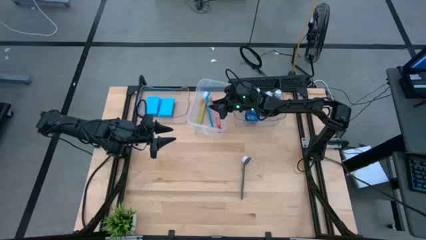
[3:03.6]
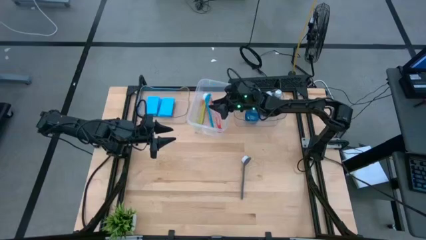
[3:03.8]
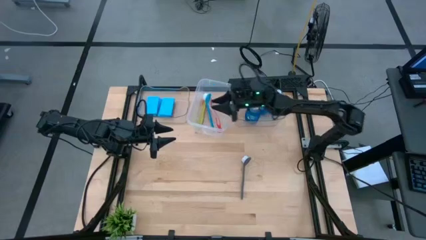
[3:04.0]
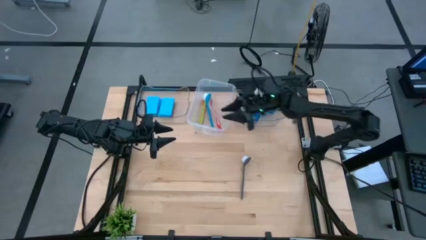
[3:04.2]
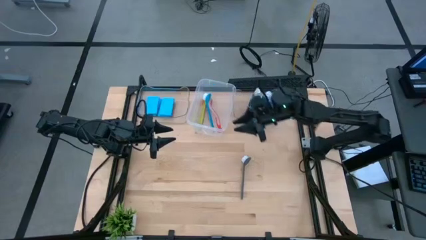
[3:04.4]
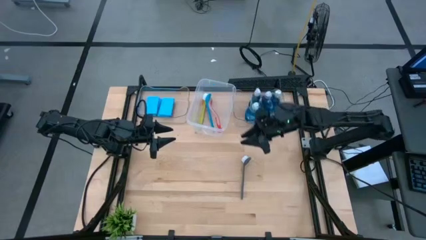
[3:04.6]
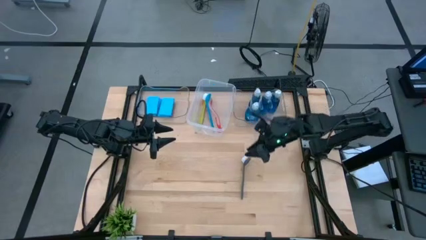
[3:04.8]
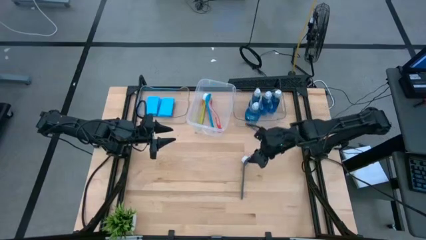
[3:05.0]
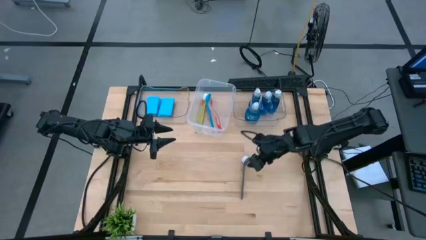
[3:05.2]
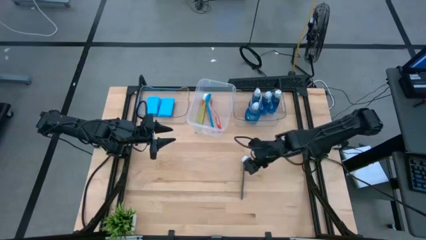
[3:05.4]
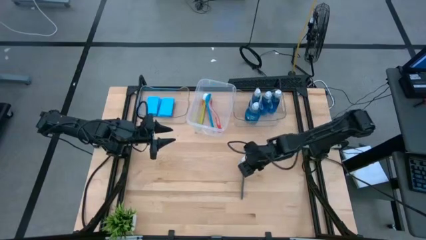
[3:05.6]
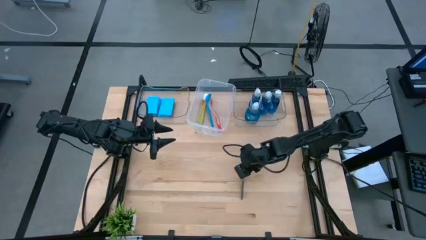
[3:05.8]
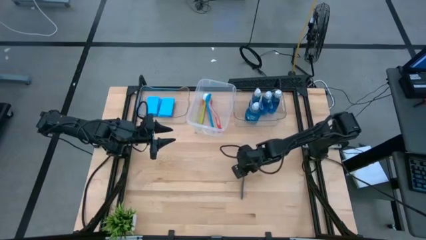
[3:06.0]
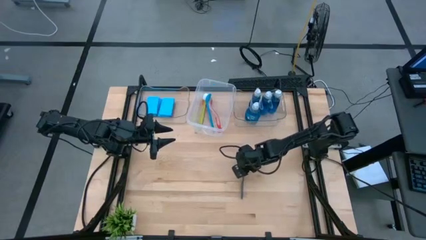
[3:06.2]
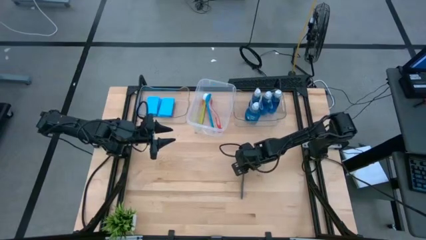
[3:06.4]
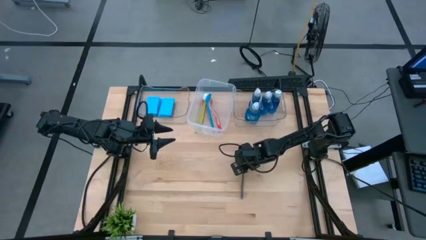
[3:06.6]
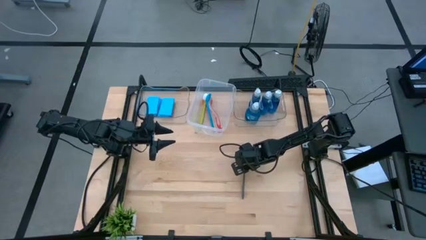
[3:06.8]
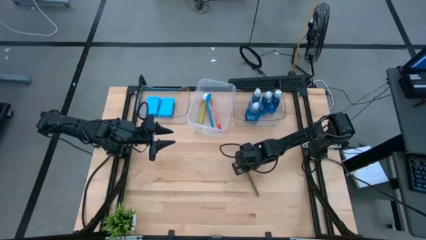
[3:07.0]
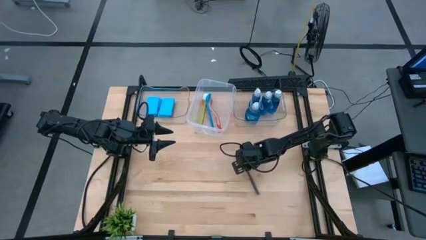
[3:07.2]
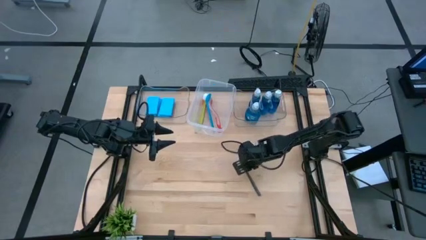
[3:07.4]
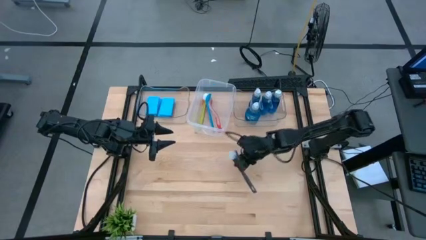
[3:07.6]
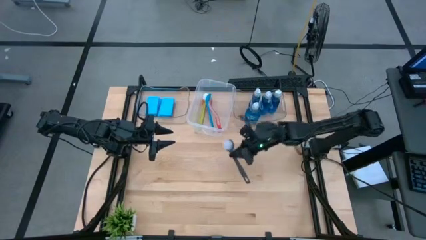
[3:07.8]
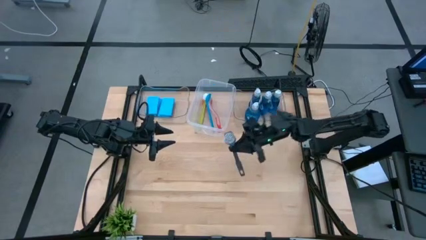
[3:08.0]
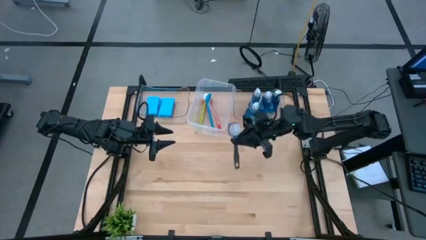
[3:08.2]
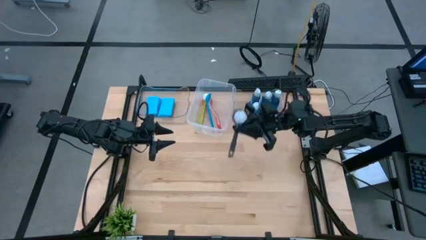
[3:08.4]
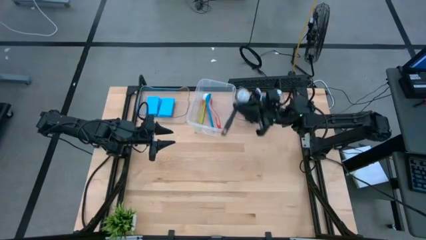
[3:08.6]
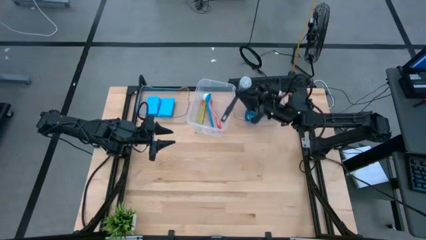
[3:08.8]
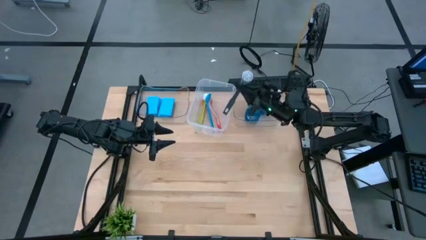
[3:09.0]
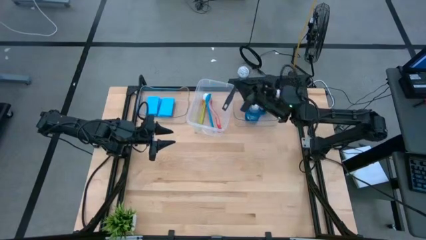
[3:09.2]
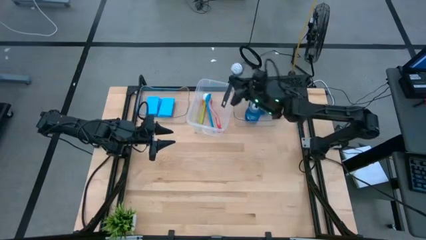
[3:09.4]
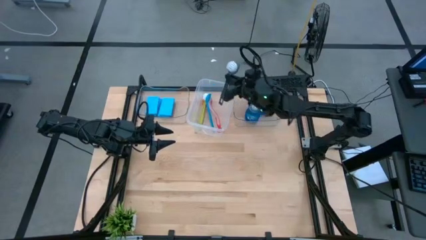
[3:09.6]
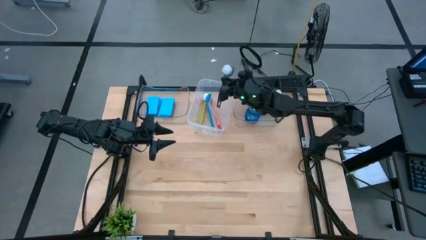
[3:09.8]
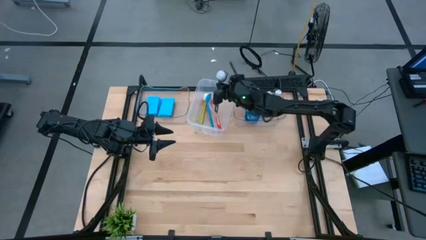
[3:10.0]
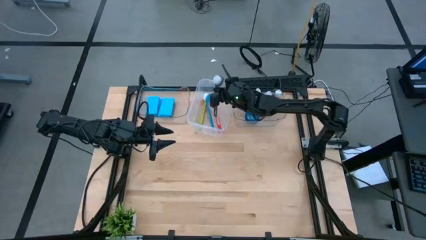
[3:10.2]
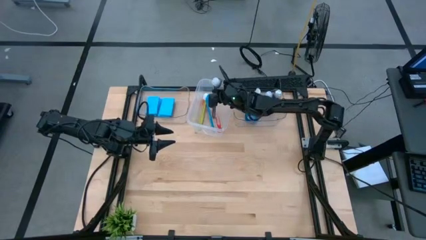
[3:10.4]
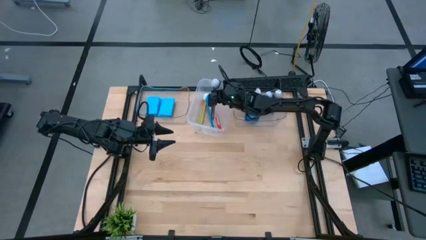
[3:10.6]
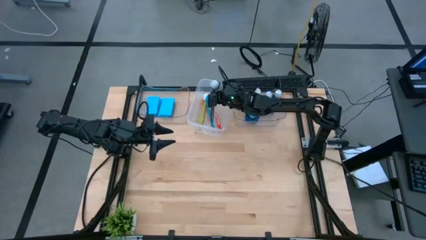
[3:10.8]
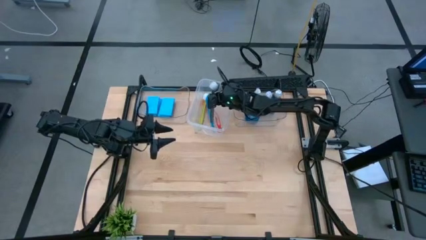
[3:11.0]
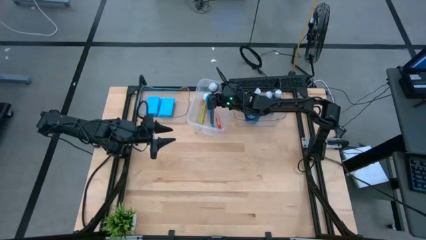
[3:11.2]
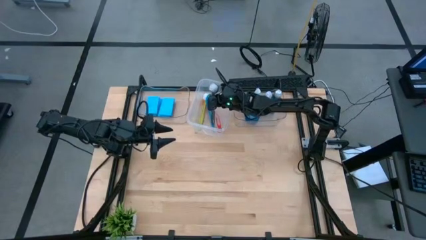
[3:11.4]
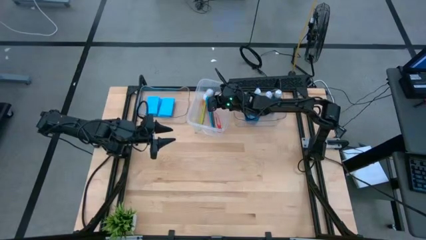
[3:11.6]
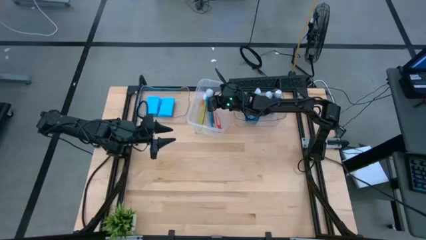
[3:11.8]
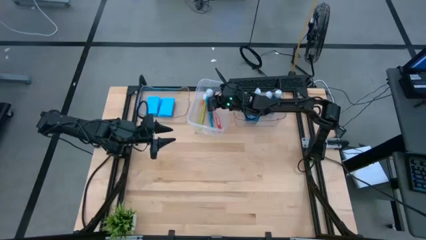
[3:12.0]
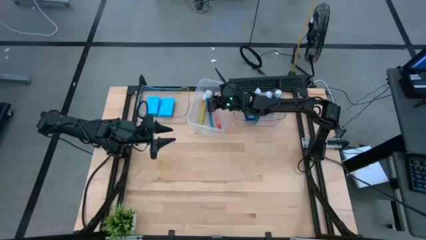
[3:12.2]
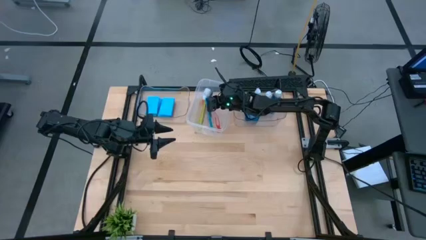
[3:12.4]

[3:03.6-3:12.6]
Task: Pick & Place Kitchen Sink Supplies
Put the black dish brush into the middle transparent bin

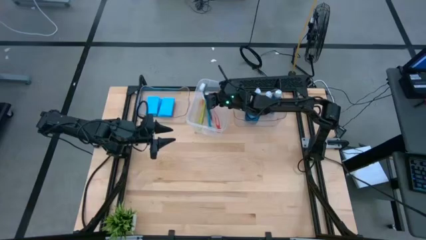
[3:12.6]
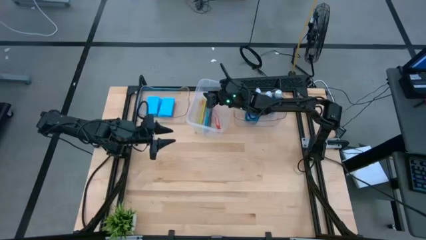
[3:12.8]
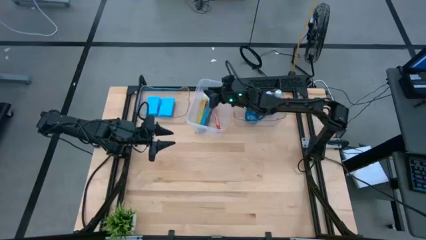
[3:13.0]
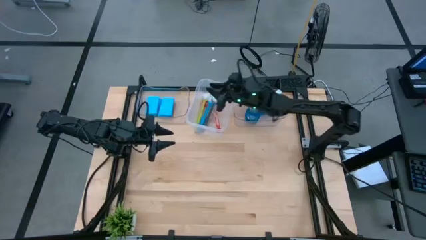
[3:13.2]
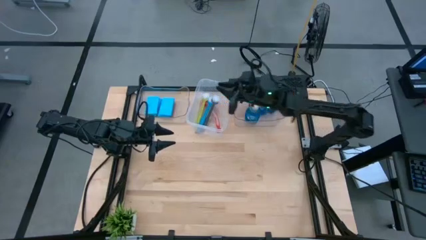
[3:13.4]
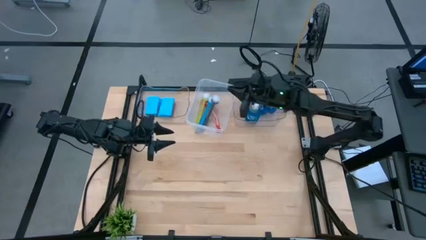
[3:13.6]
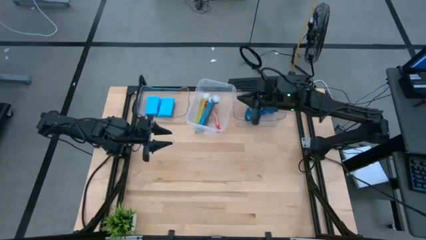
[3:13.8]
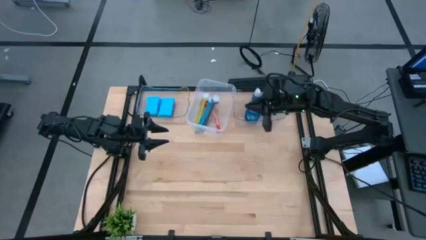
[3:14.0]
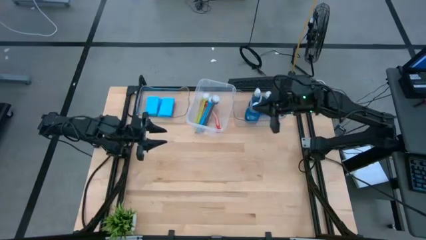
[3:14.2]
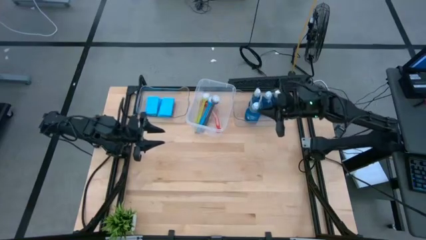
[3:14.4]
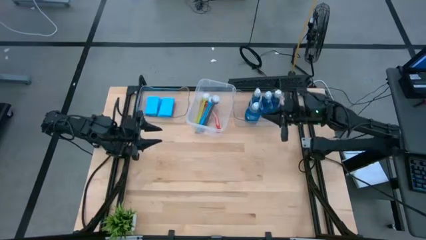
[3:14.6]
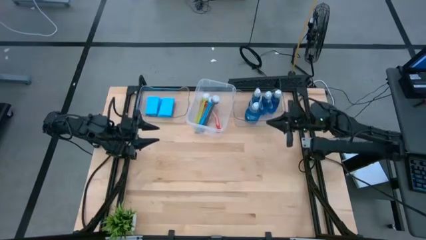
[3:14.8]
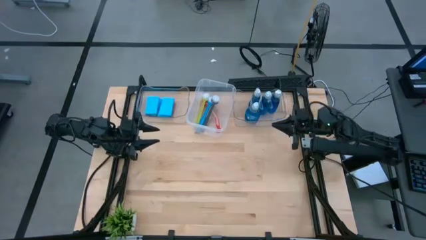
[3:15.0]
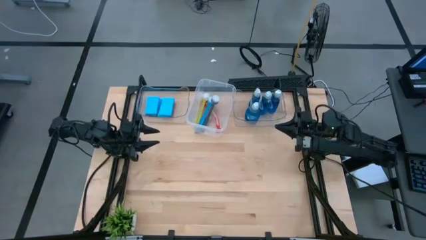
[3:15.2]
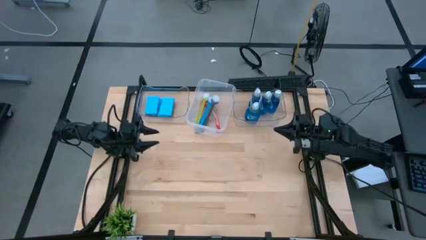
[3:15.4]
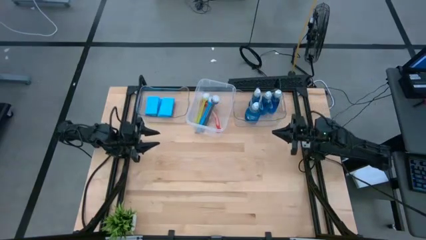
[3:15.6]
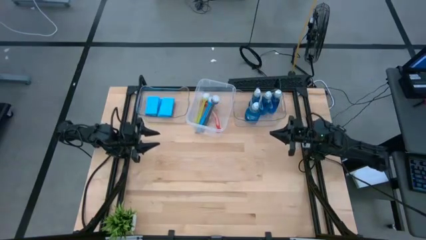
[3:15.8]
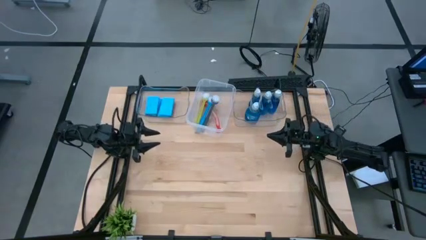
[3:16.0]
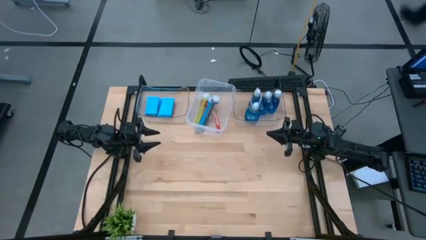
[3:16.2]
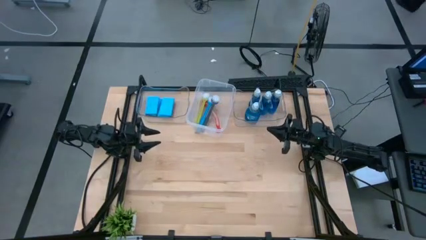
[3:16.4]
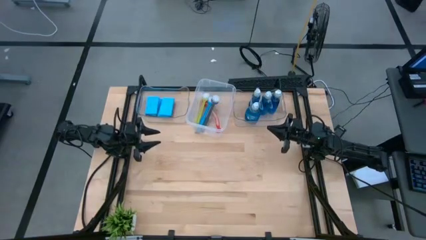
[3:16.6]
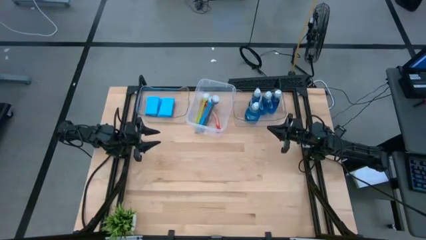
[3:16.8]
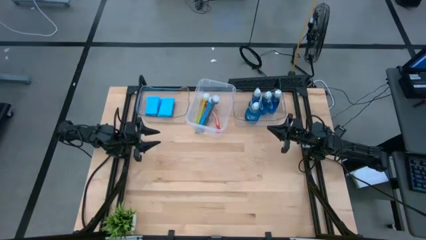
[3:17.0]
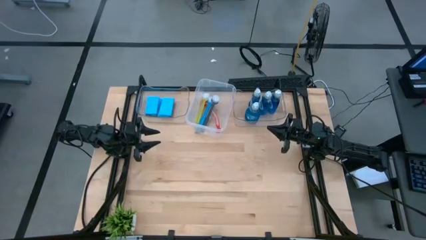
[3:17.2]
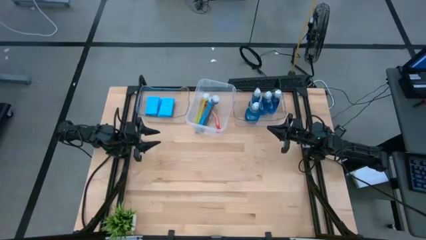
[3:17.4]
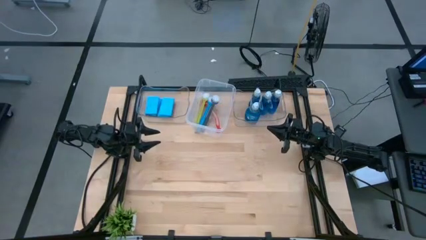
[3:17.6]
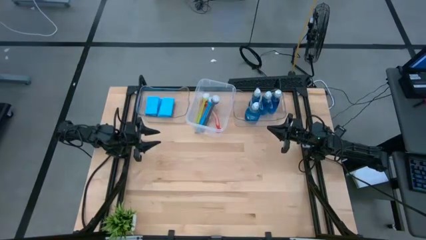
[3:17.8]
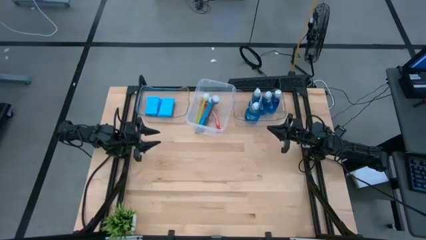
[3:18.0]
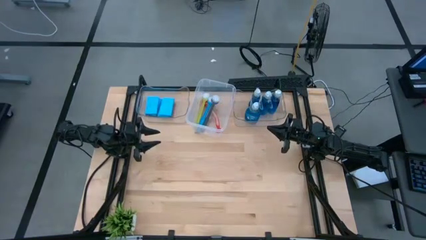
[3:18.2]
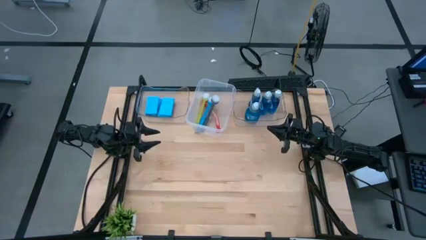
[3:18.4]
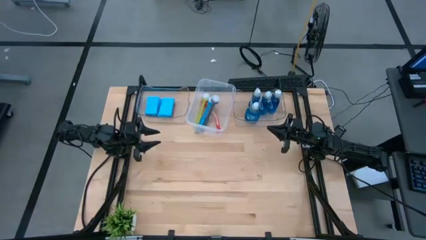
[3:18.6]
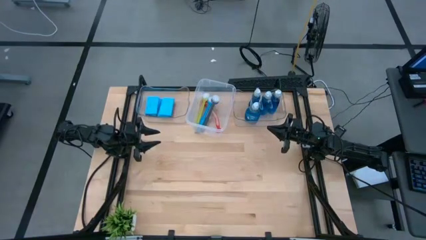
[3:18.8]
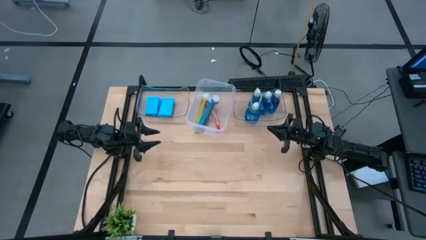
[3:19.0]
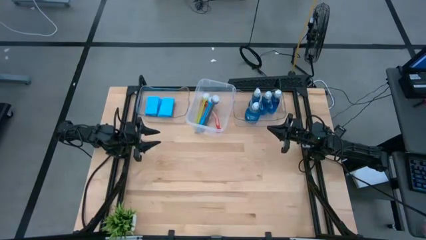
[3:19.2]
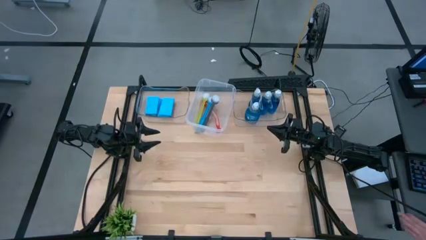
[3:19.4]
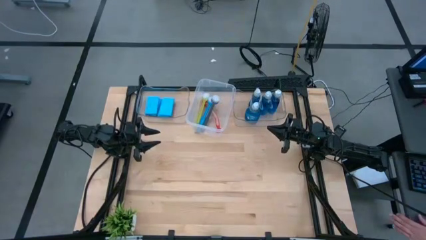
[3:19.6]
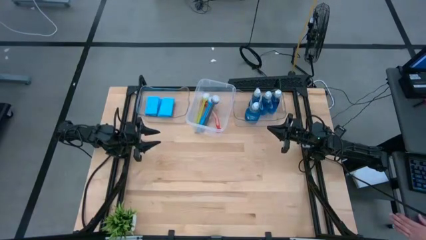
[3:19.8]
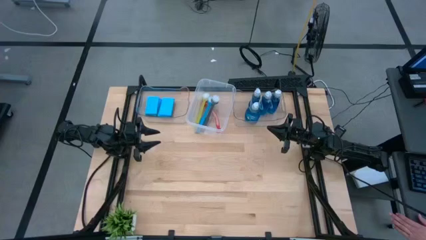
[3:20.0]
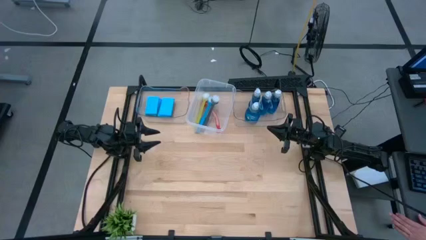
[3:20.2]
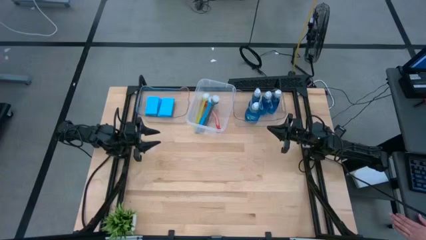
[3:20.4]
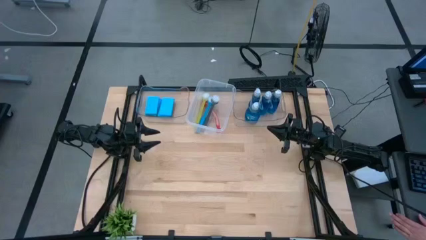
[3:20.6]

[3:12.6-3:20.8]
Return to Home Position
